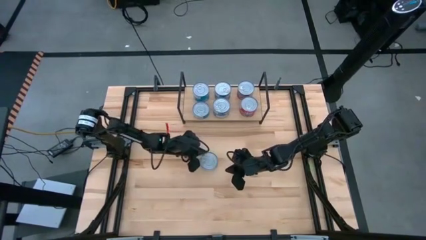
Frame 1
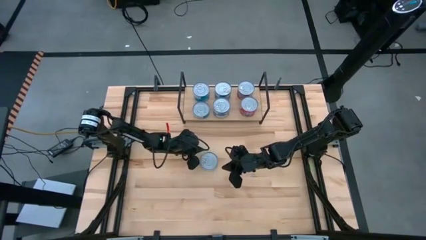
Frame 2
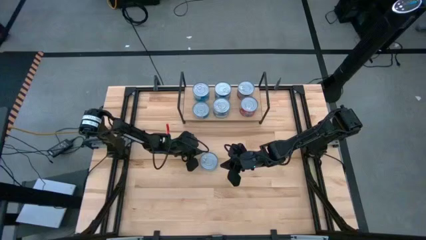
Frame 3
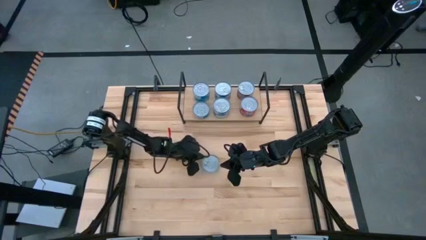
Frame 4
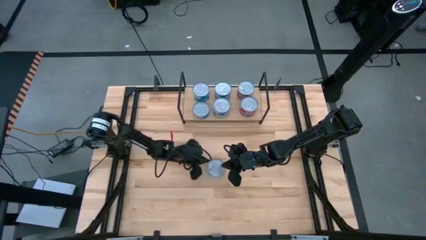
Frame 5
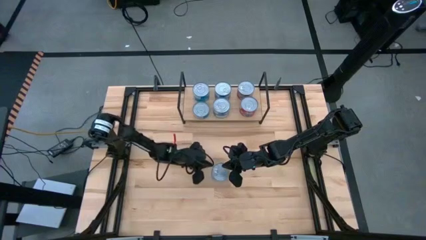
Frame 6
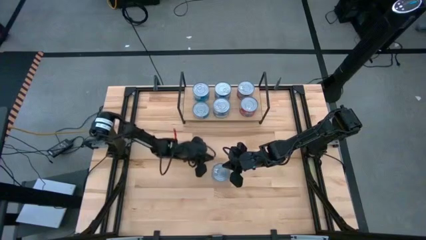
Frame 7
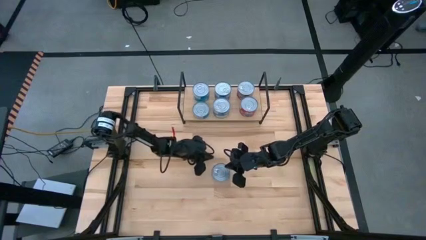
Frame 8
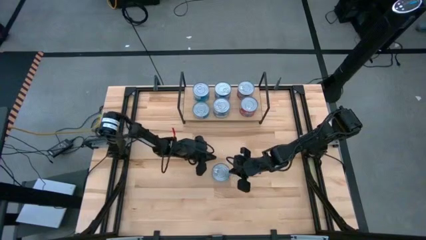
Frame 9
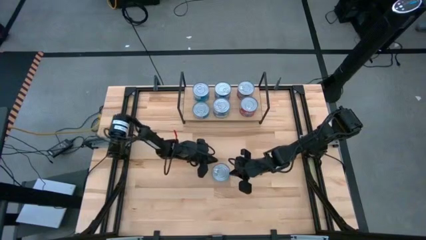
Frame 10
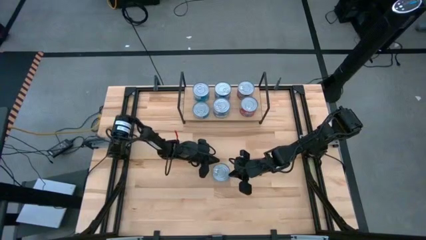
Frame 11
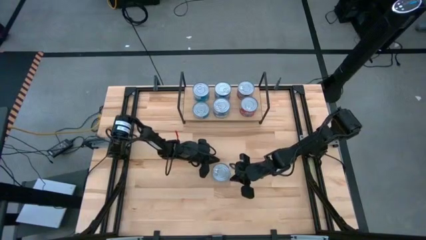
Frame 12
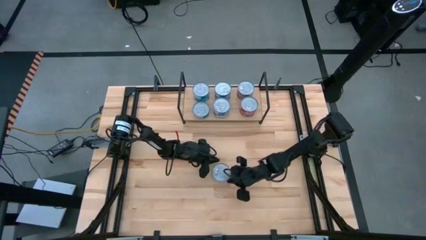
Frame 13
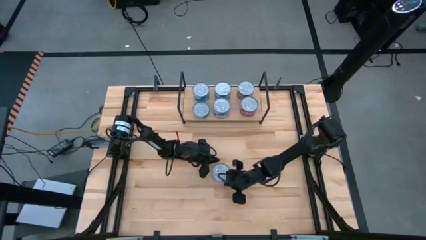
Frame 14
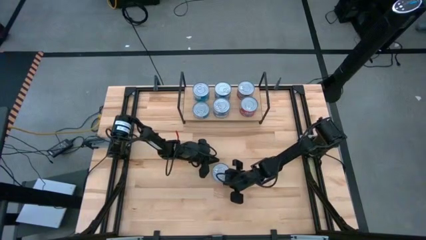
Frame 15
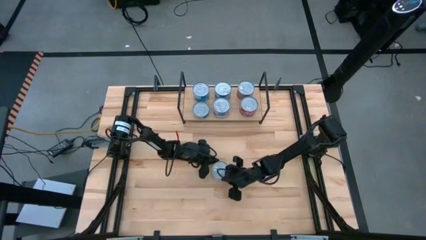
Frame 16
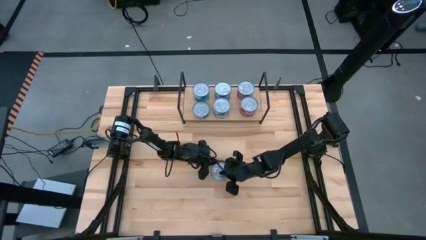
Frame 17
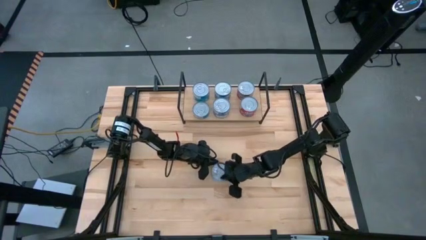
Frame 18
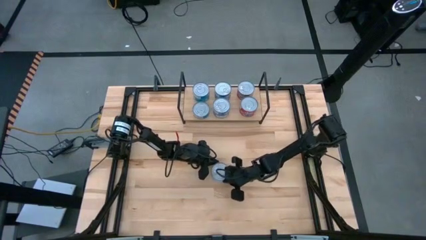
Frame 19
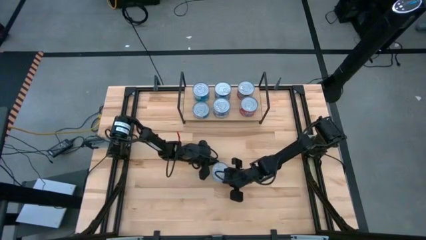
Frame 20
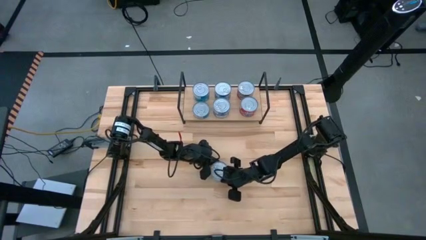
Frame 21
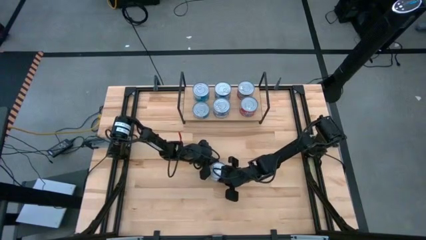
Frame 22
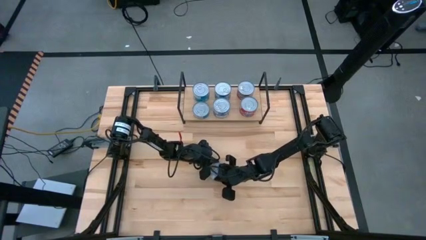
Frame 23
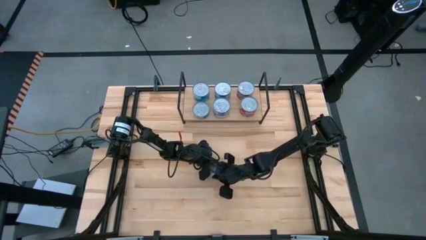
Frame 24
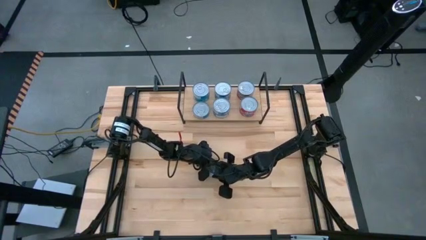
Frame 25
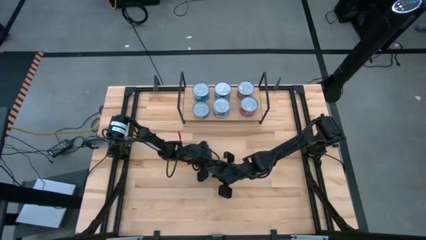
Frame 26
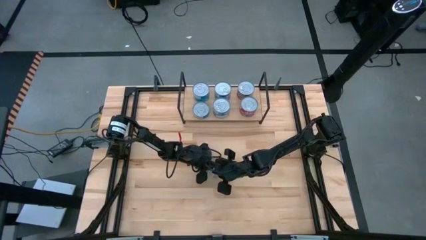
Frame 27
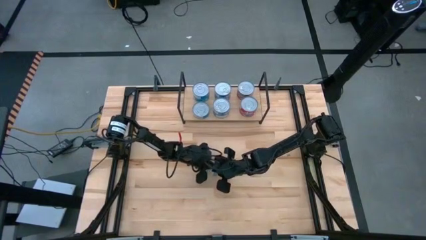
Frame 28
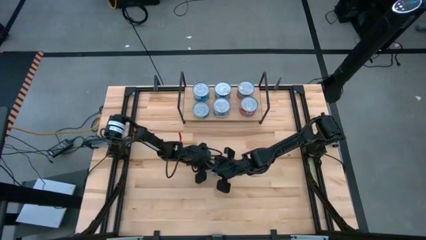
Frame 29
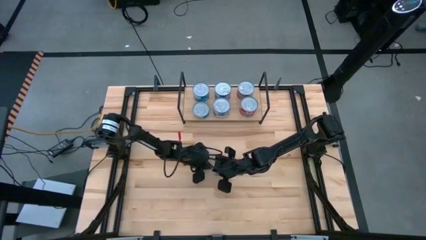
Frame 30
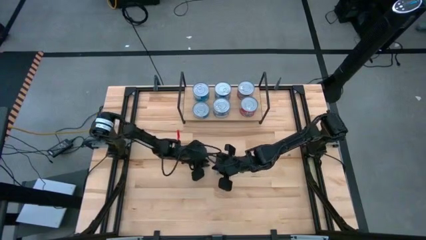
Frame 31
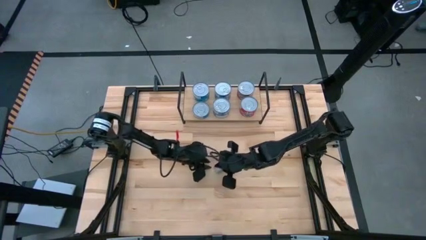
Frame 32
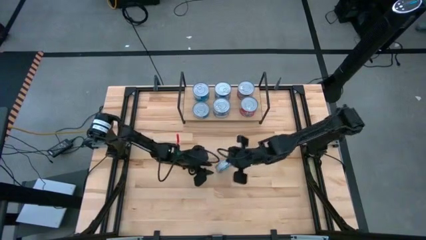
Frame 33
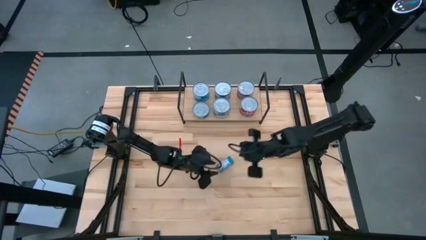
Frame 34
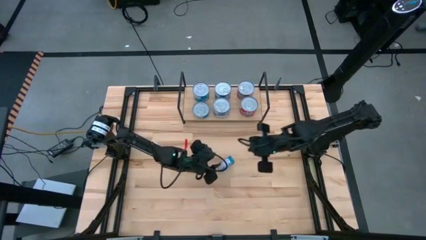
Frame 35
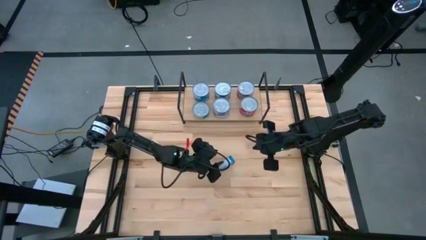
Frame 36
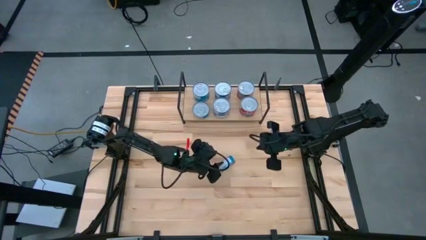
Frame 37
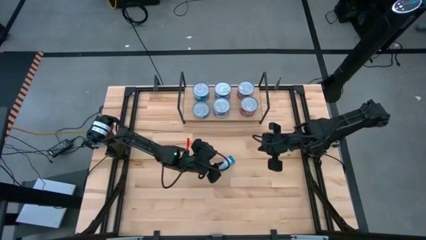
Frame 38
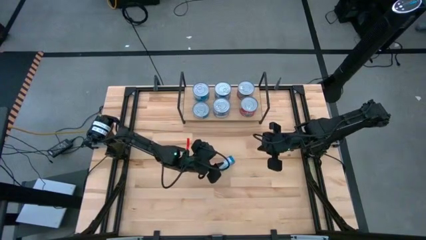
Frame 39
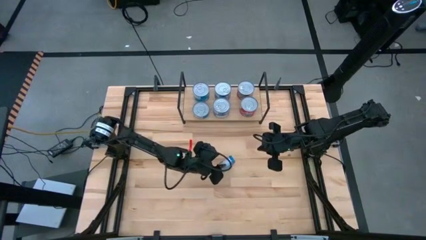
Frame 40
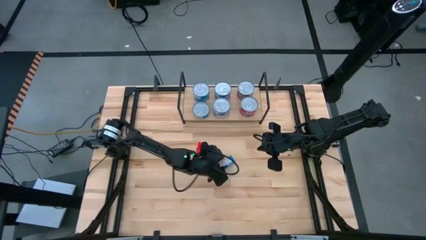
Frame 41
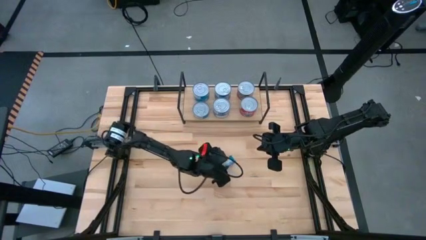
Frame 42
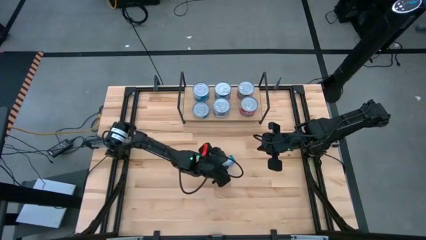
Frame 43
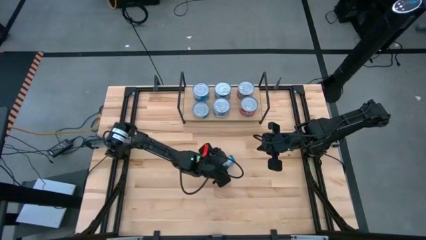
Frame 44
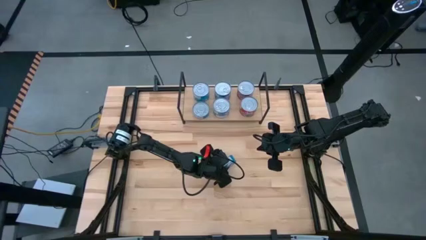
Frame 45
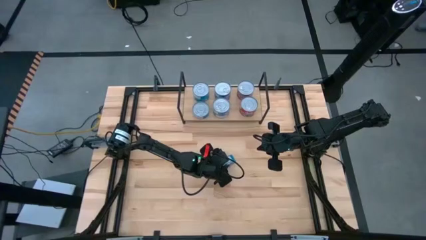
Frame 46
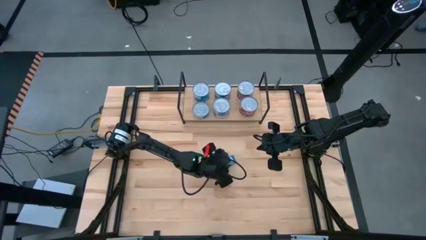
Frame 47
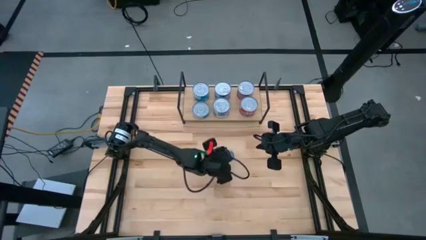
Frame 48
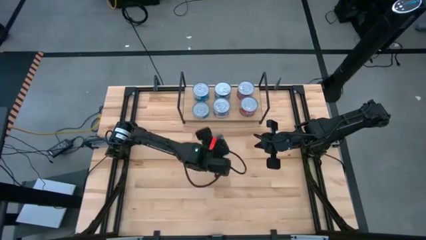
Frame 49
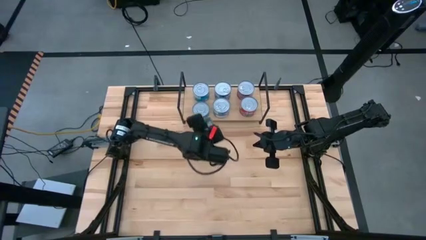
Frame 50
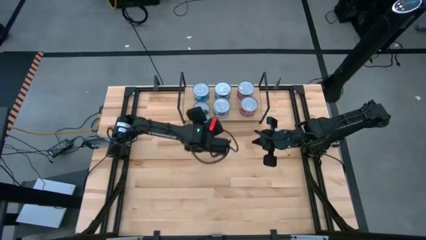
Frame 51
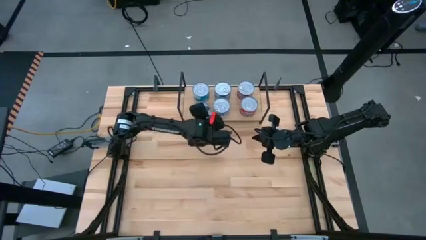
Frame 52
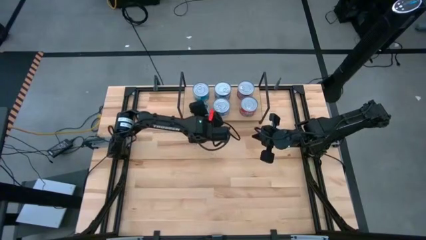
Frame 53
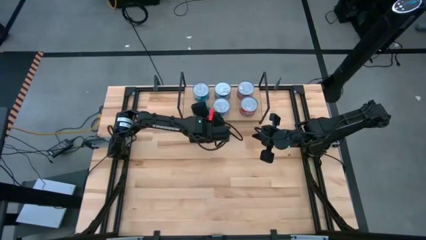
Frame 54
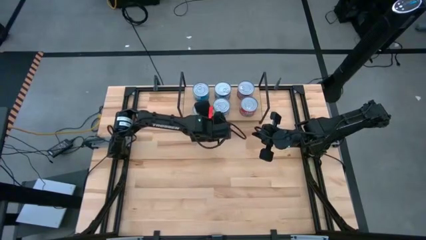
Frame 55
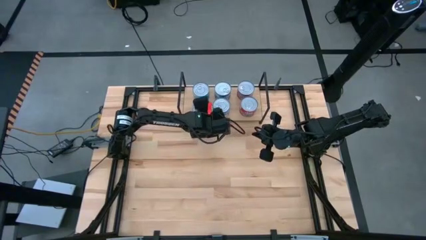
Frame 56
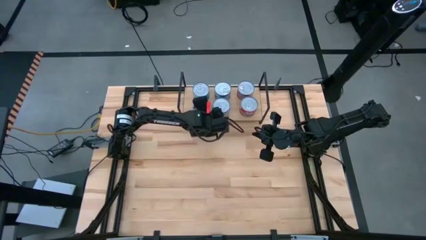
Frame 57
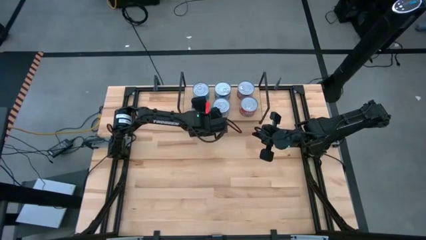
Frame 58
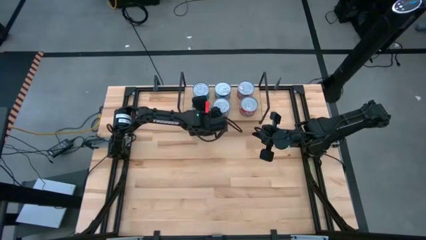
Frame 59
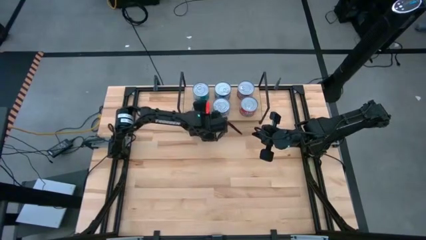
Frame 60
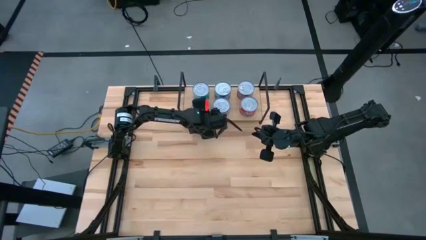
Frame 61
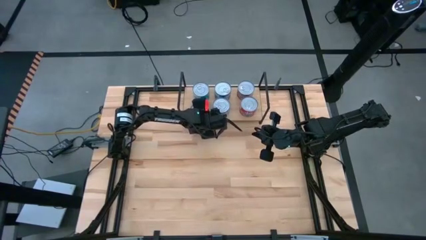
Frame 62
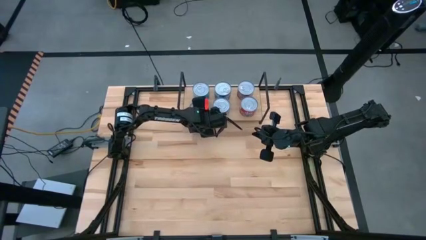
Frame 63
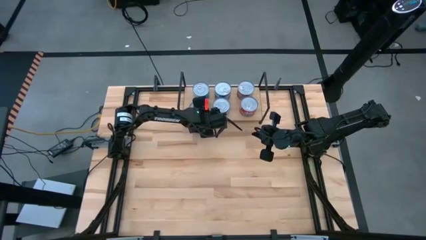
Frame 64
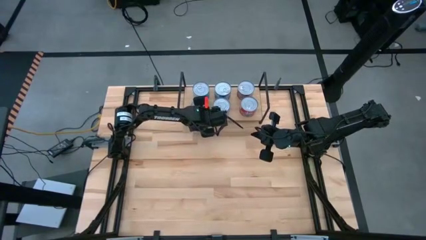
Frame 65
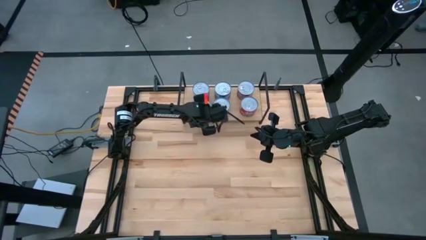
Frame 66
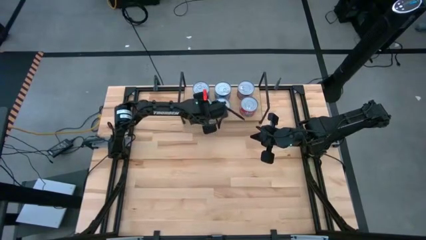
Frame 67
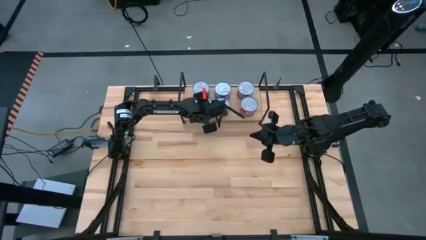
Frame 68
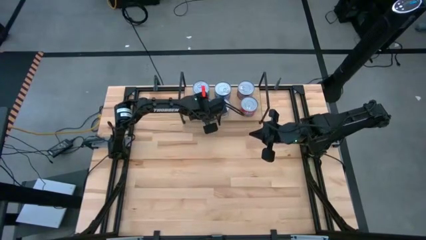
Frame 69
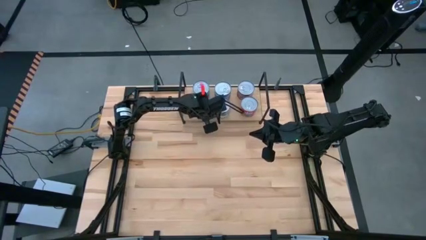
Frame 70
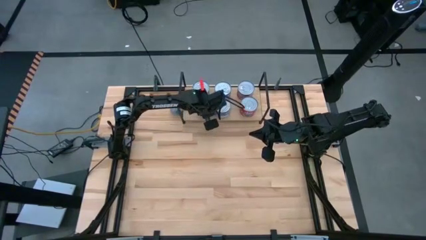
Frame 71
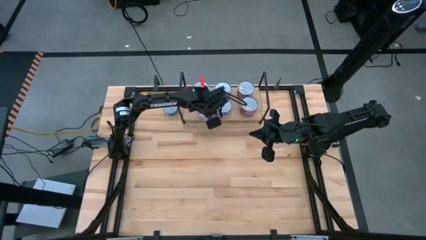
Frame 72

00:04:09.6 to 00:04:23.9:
Task: Stack canned seafood by type on shelf
Stack the yellow-blue tuna can on top of the yellow-blue tuna can on the shelf

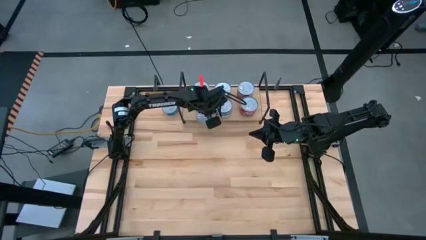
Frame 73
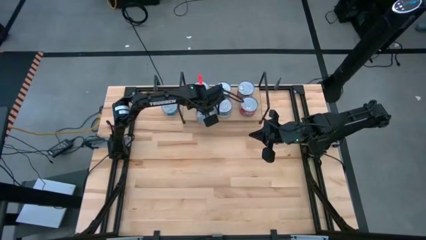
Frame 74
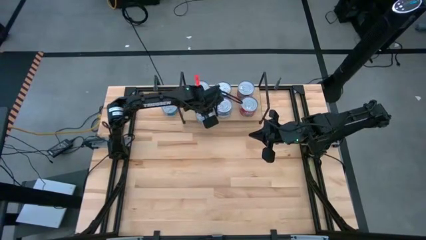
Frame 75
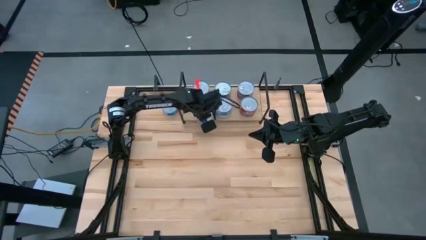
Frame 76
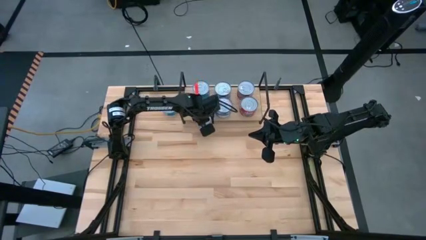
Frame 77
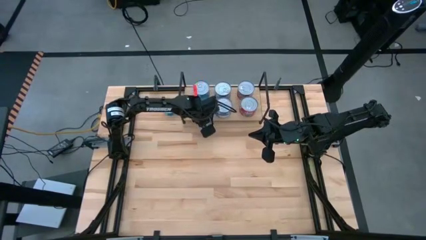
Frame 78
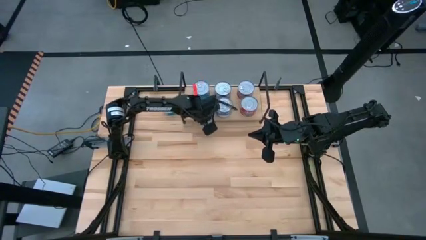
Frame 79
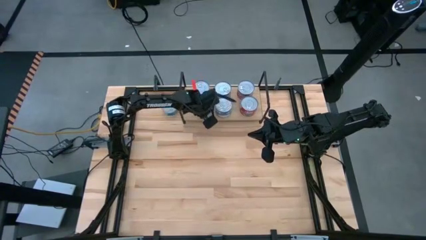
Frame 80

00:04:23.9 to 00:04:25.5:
Adjust the yellow-blue tuna can on the shelf

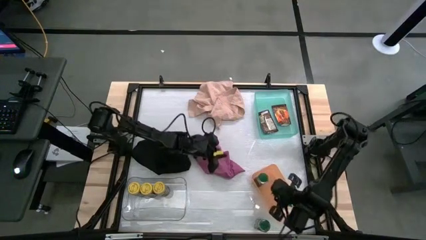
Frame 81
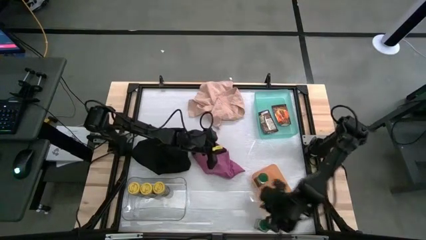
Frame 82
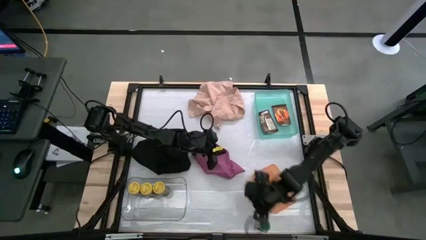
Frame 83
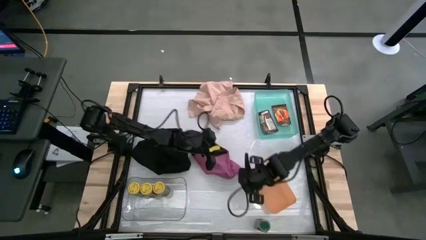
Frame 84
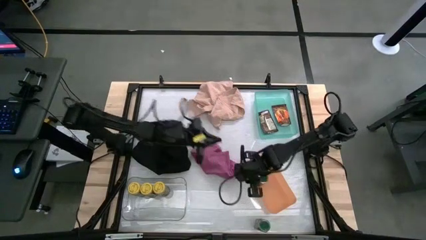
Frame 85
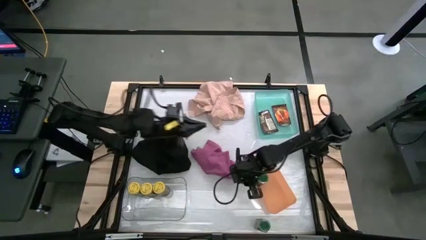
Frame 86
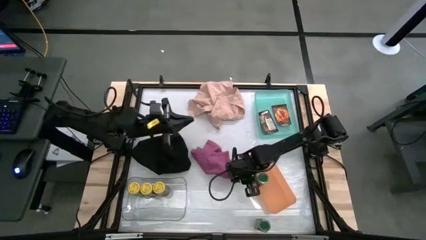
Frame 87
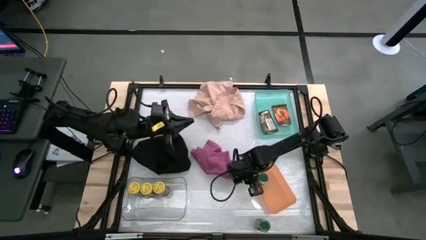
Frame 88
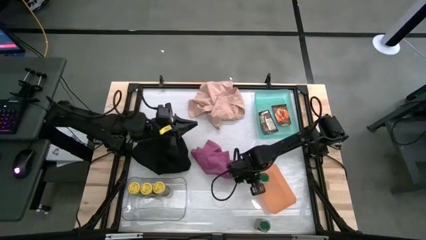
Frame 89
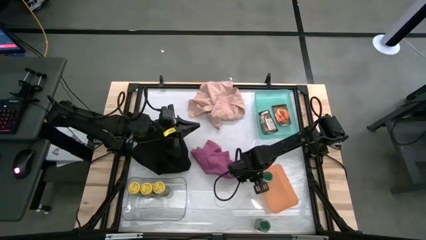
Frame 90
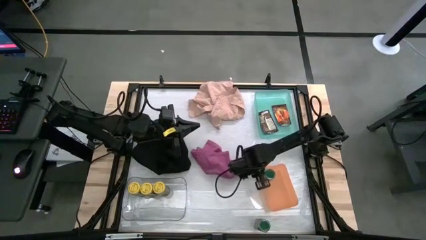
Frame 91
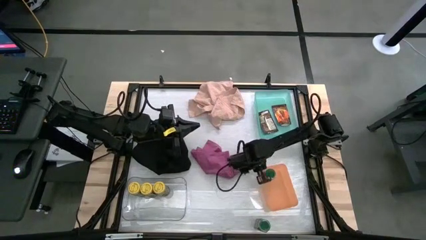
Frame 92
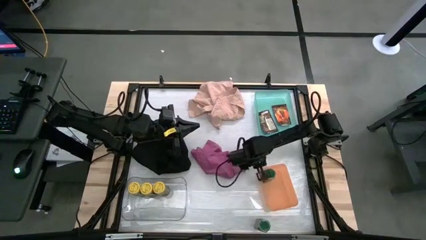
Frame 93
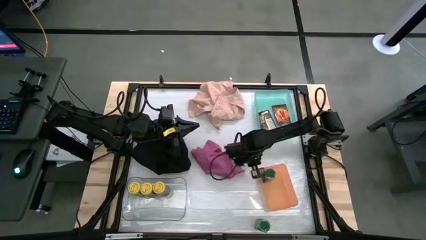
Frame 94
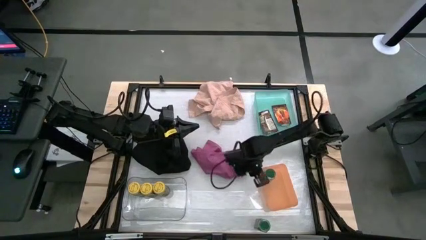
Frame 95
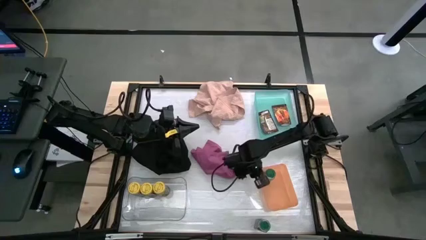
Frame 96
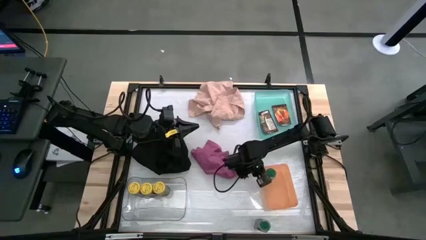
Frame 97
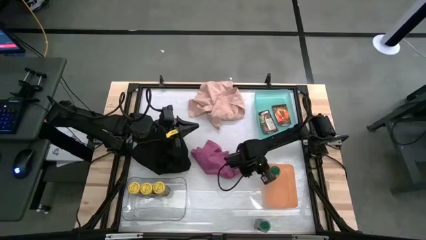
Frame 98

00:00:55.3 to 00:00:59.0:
Task: Sort spices by type
Adjust the orange bin
